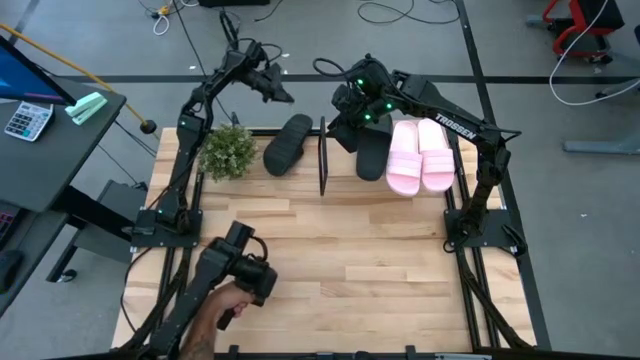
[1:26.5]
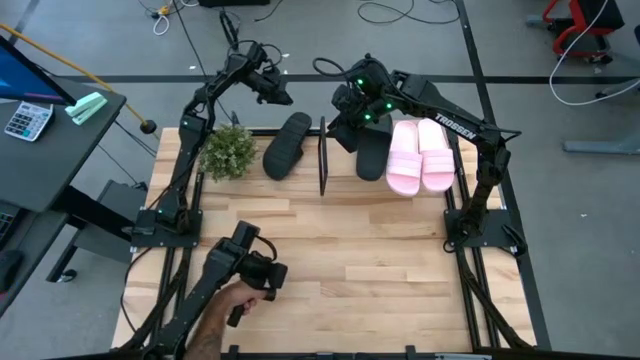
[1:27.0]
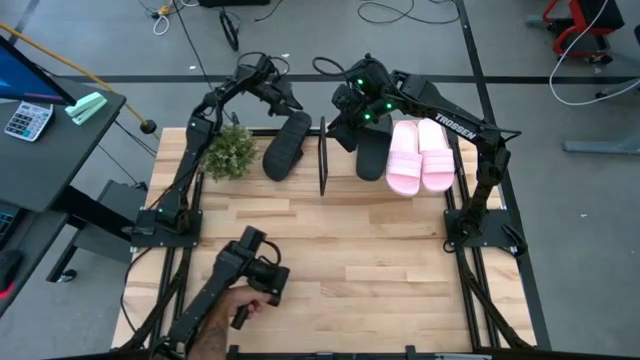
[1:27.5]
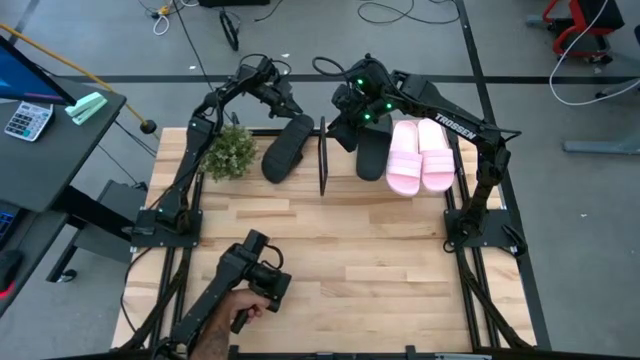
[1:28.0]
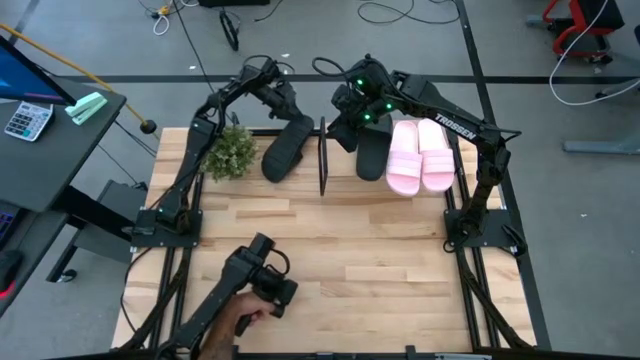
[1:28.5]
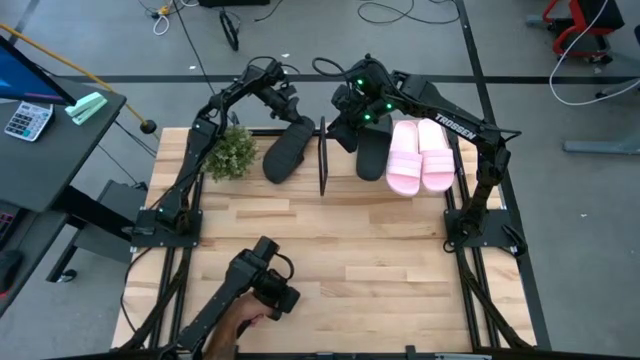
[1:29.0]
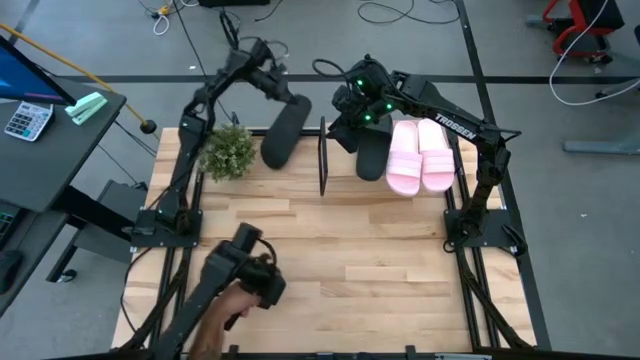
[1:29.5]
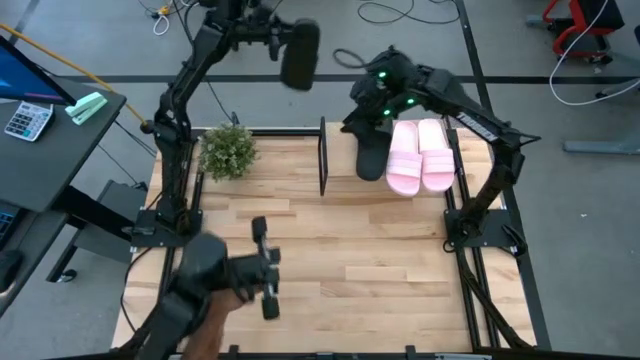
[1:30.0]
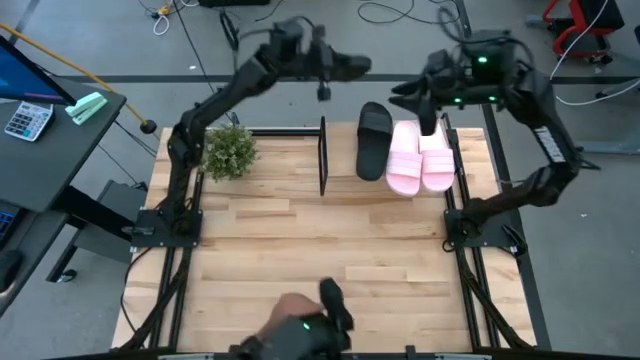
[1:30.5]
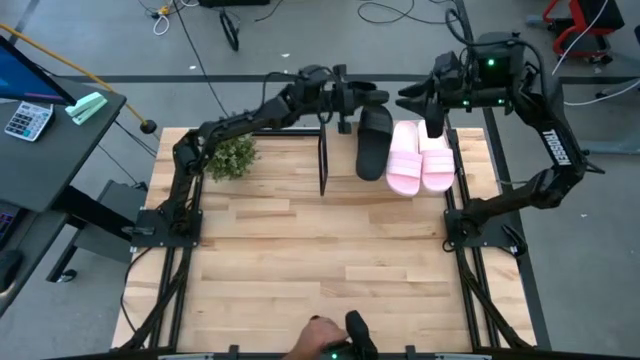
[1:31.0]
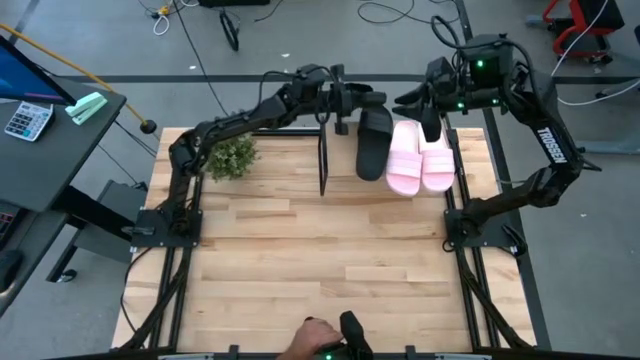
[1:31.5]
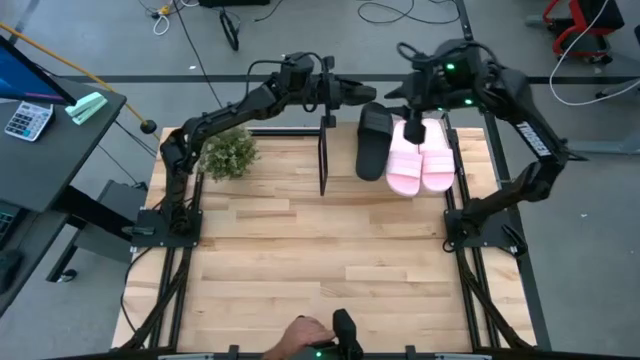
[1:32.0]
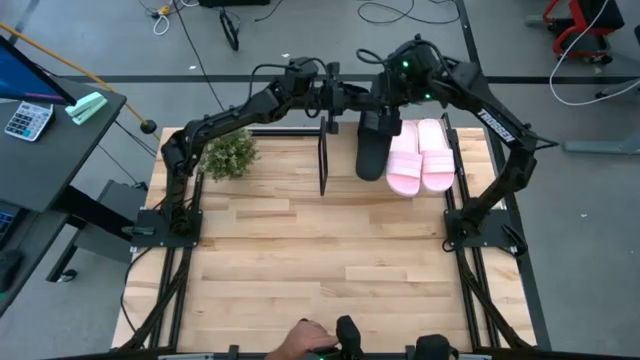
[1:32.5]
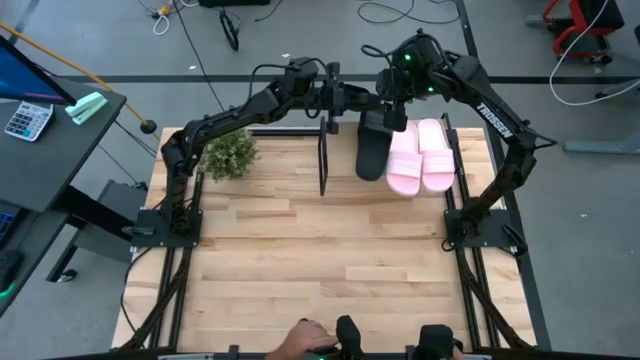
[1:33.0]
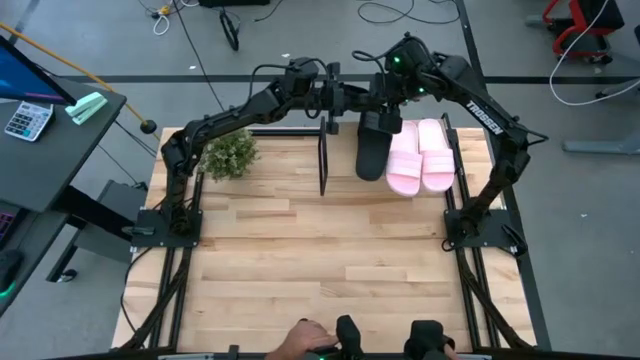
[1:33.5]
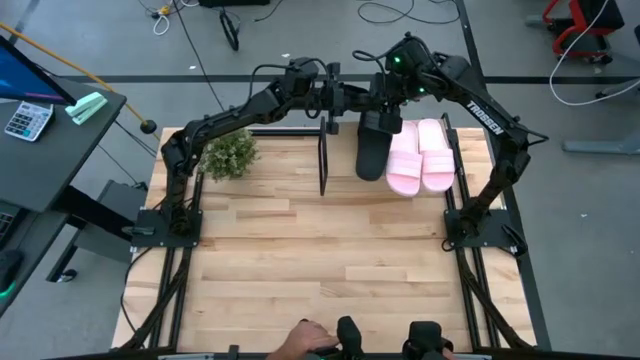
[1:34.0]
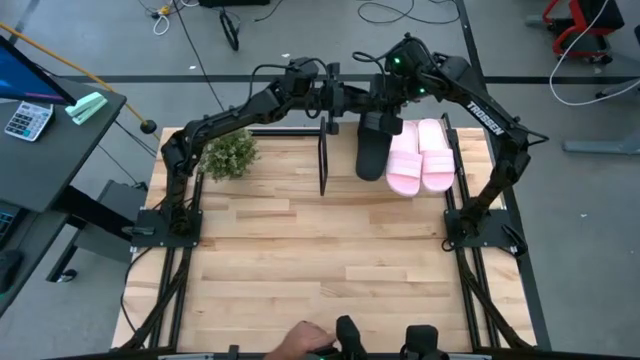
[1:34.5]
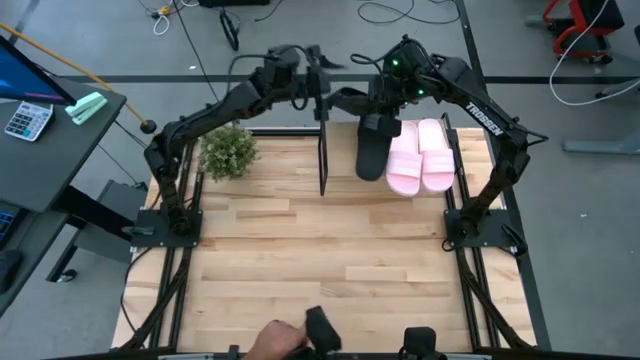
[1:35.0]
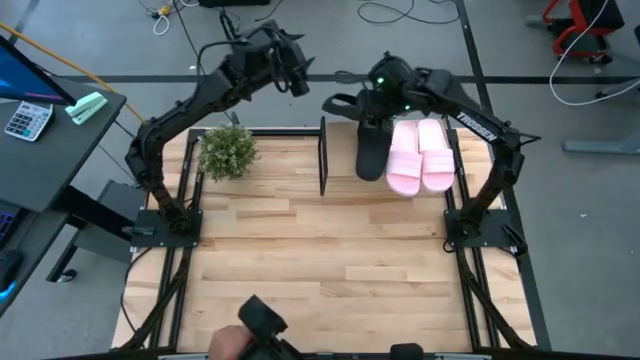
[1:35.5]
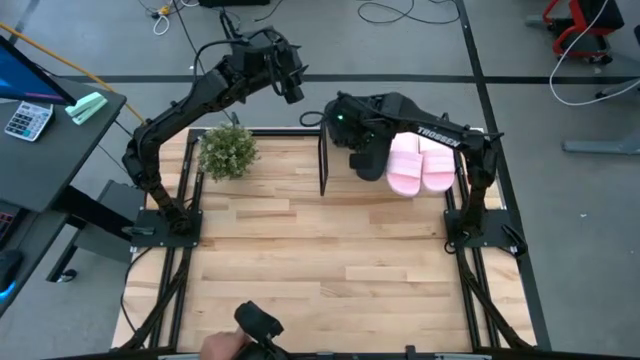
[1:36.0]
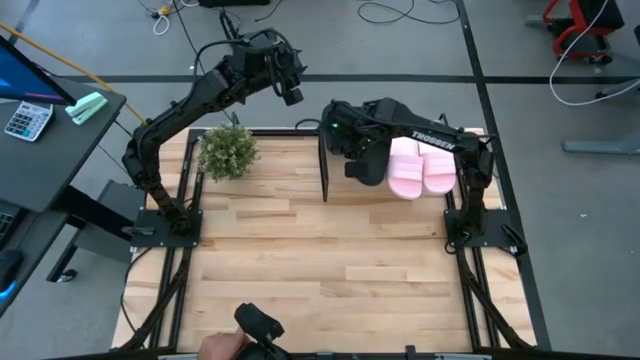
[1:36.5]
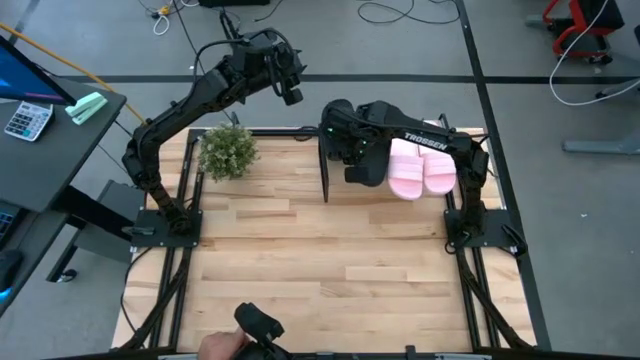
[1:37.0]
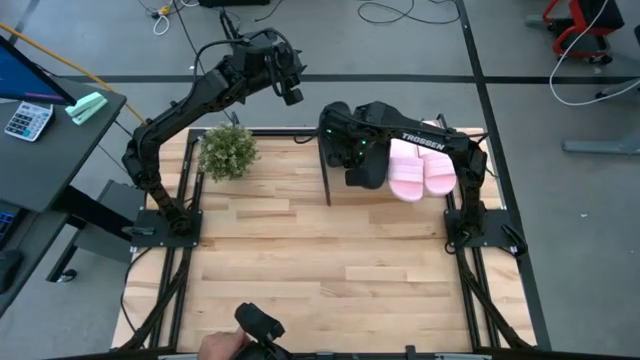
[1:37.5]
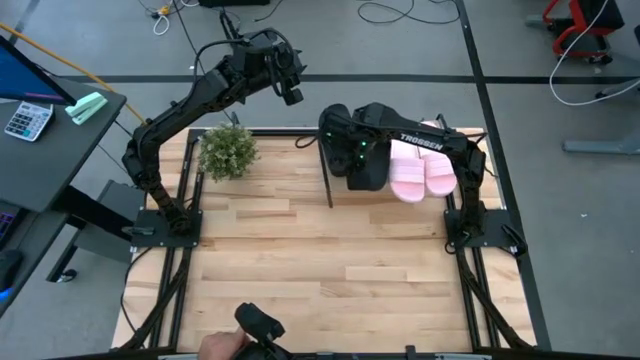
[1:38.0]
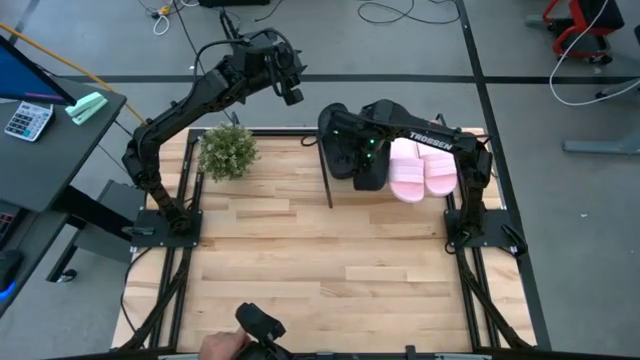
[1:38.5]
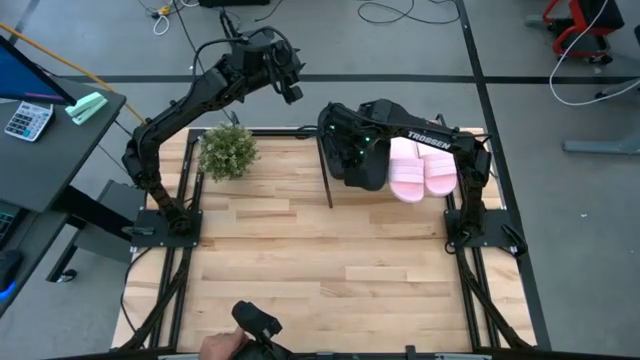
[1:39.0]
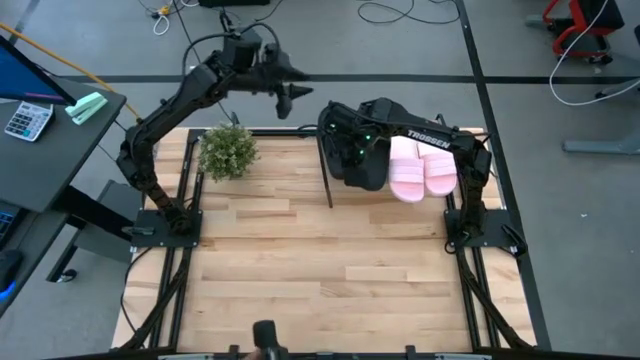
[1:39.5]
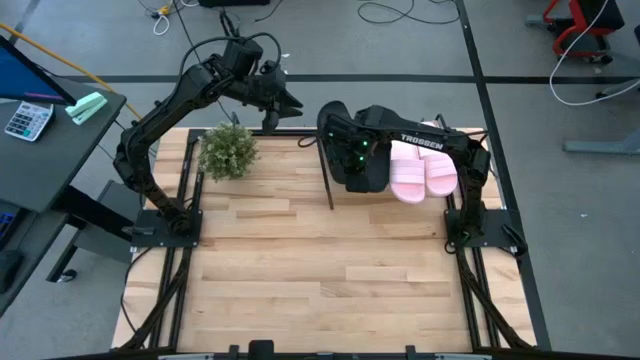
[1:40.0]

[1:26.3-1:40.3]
Task: Pick and place slides into the shelf
Put the black slipper on the shelf
